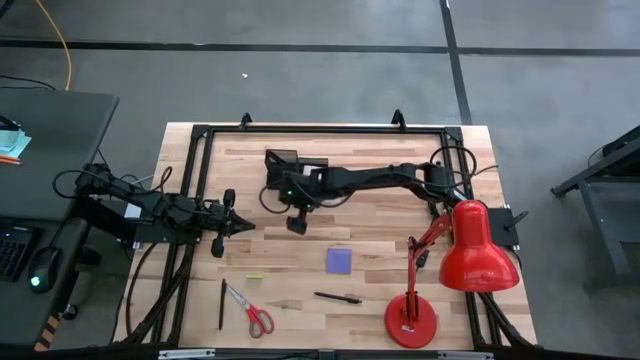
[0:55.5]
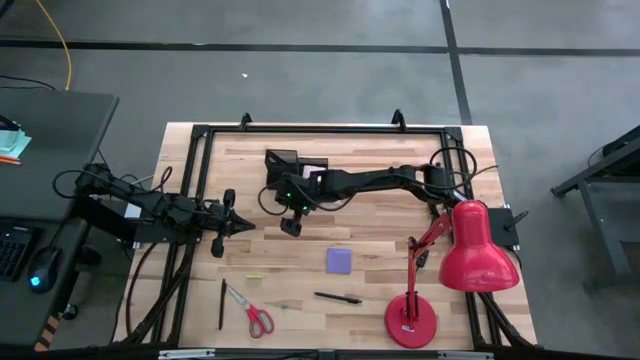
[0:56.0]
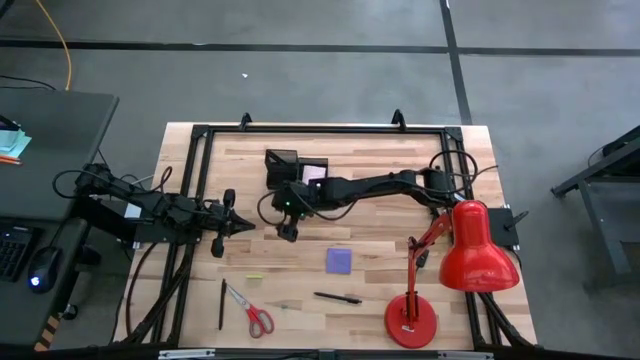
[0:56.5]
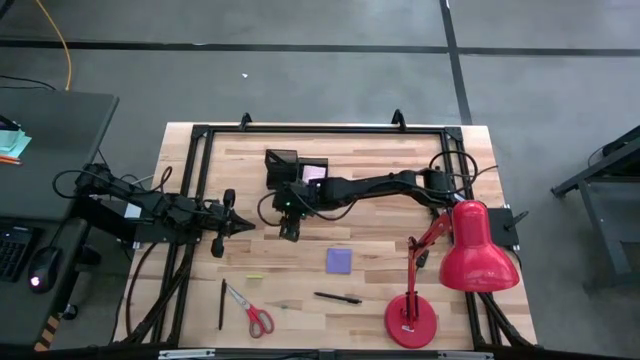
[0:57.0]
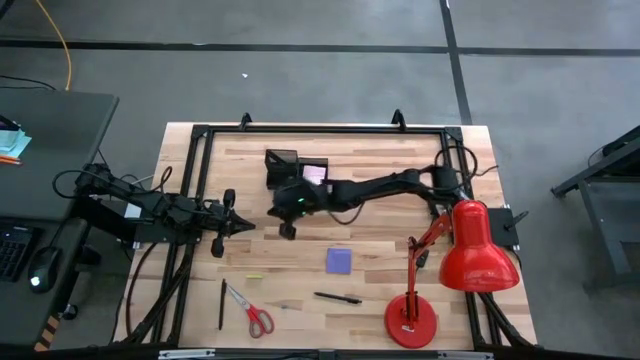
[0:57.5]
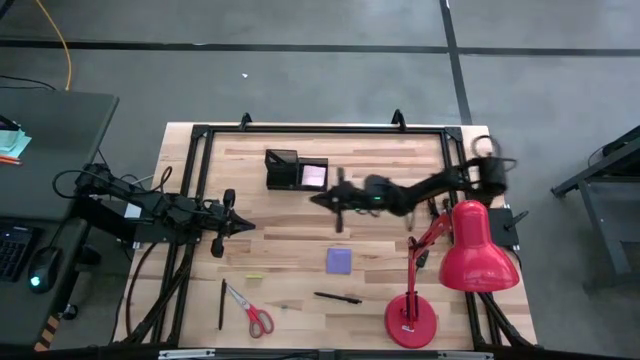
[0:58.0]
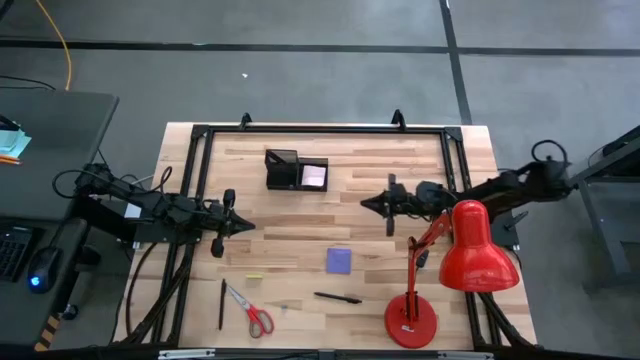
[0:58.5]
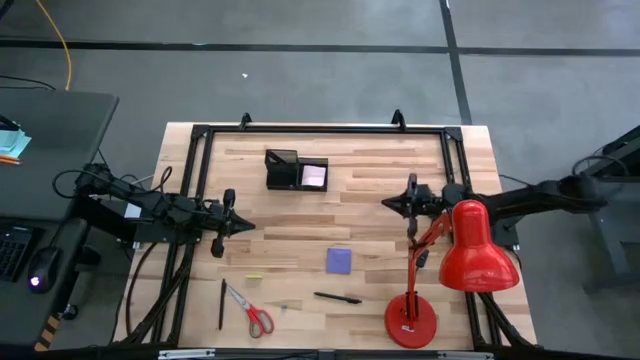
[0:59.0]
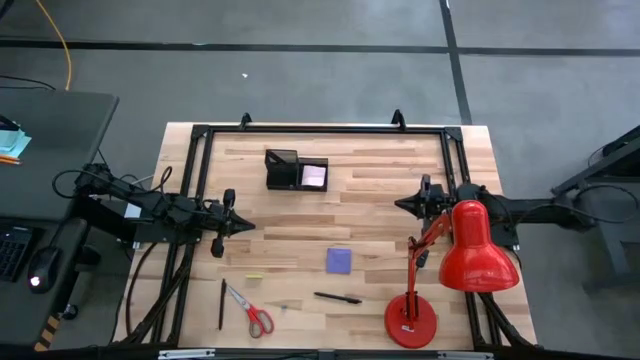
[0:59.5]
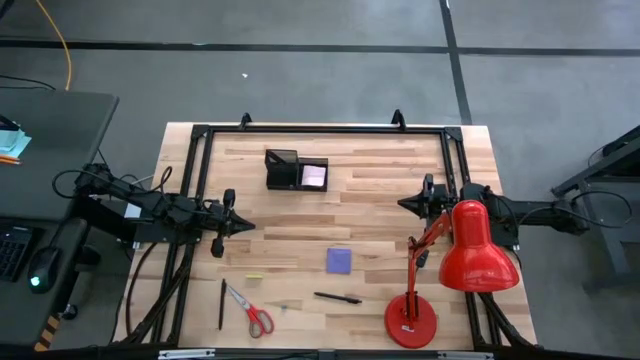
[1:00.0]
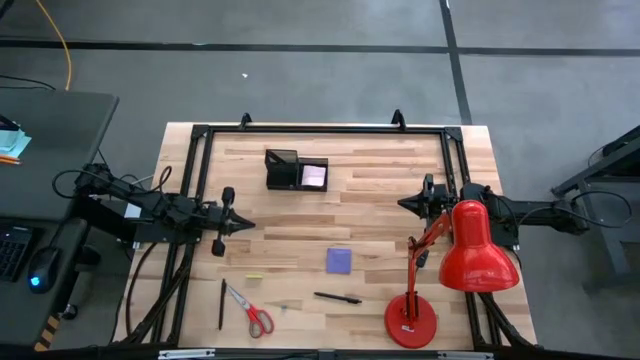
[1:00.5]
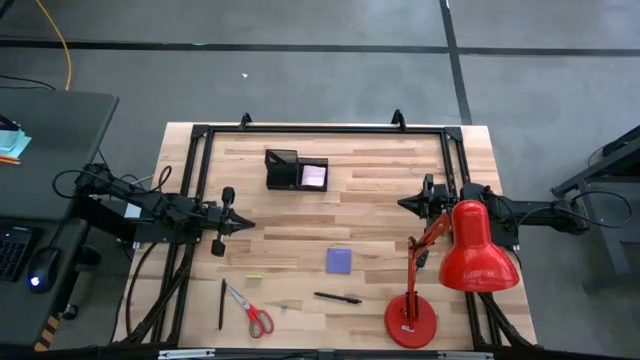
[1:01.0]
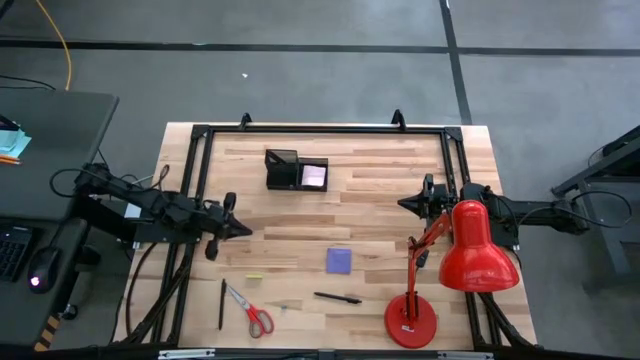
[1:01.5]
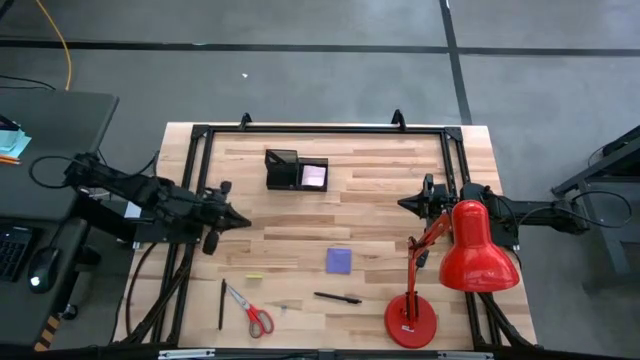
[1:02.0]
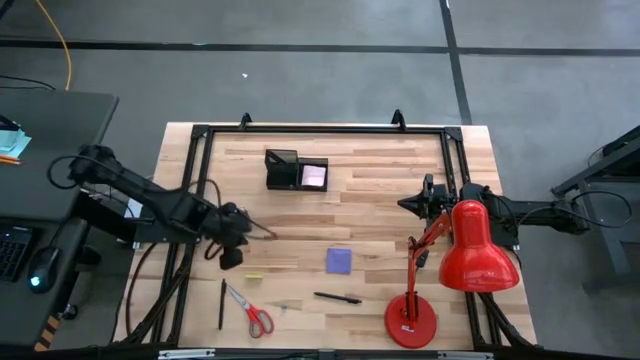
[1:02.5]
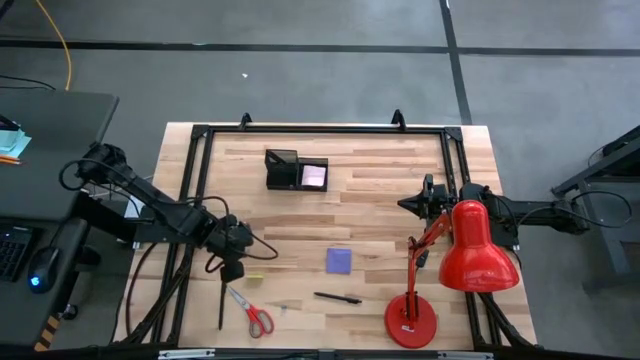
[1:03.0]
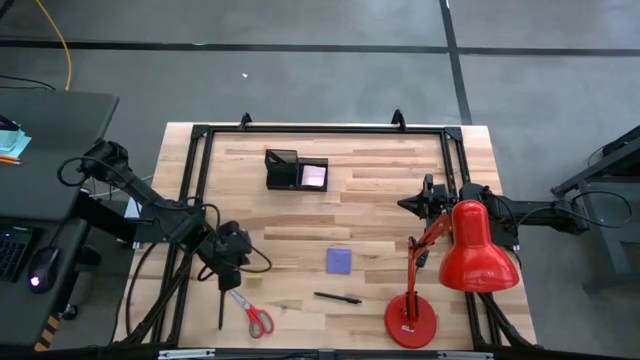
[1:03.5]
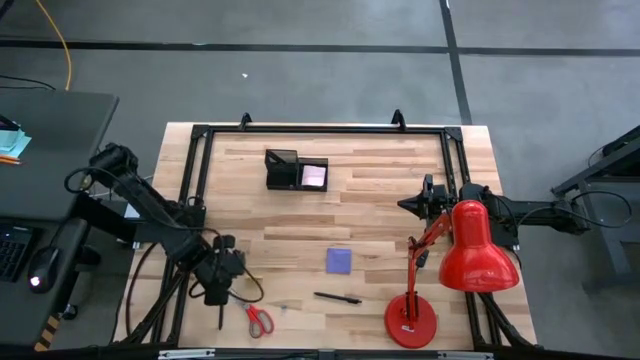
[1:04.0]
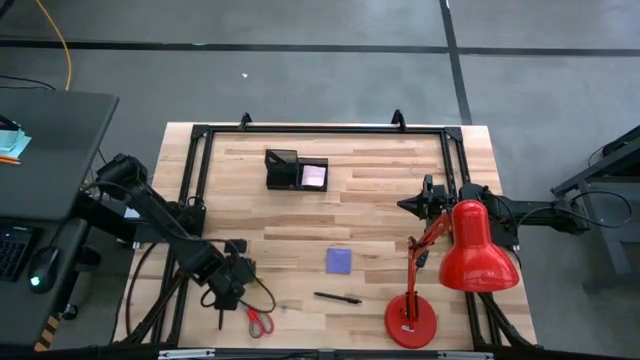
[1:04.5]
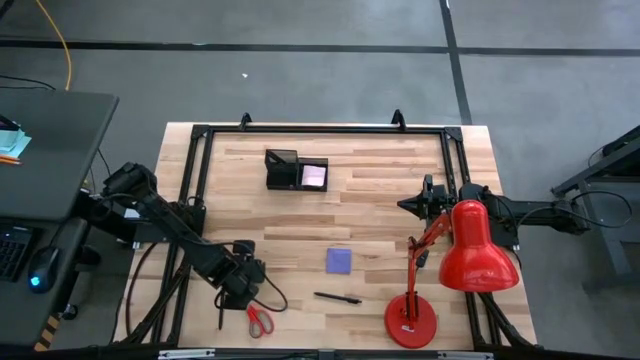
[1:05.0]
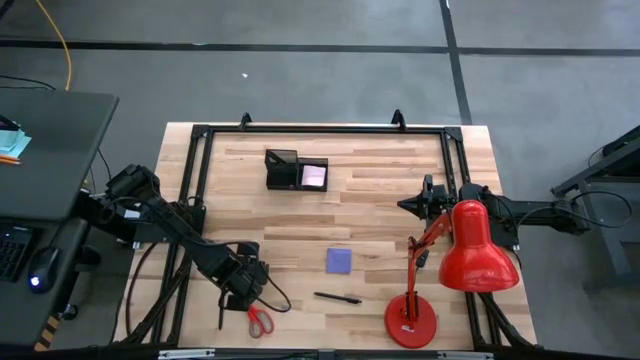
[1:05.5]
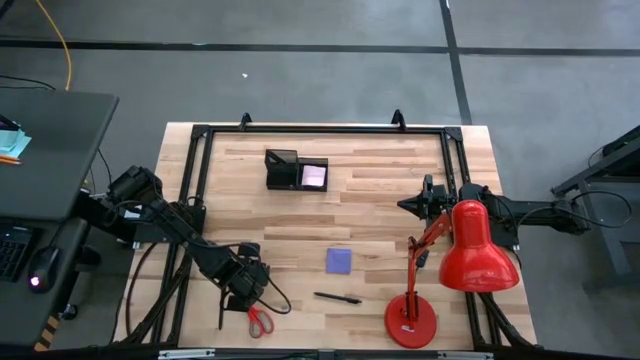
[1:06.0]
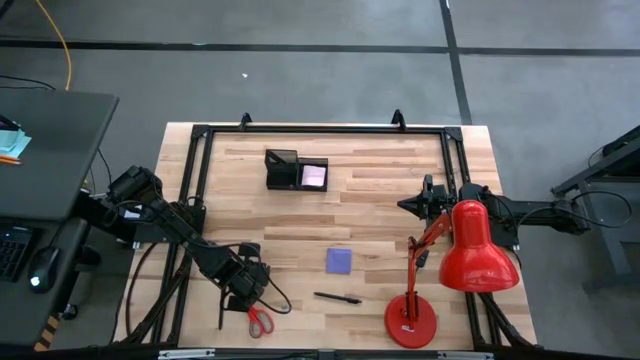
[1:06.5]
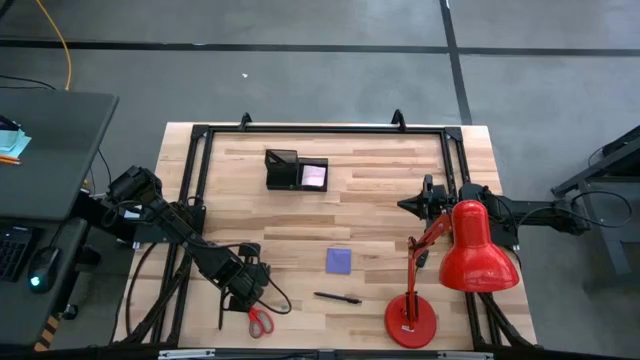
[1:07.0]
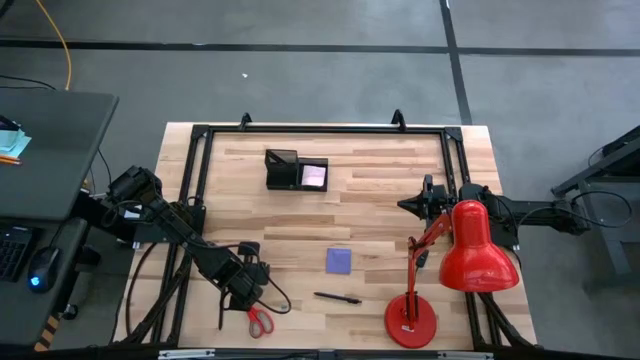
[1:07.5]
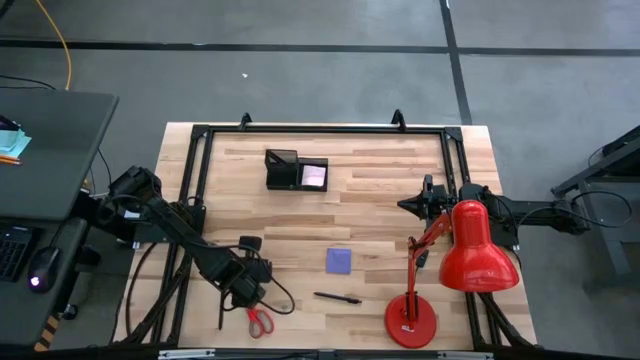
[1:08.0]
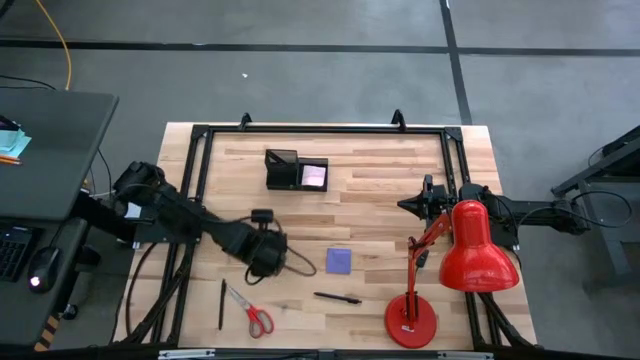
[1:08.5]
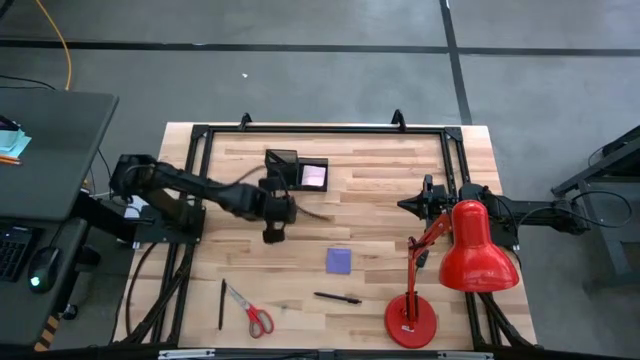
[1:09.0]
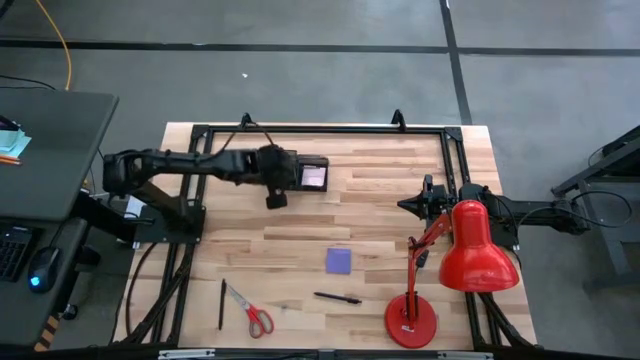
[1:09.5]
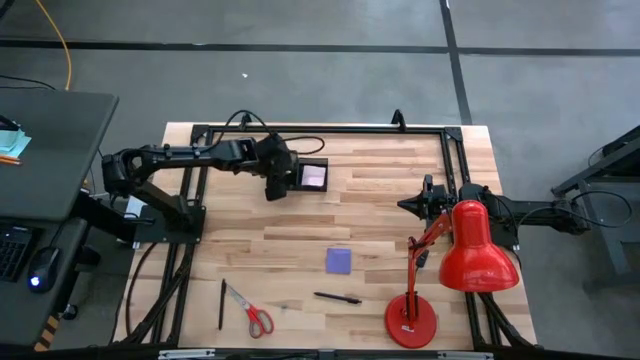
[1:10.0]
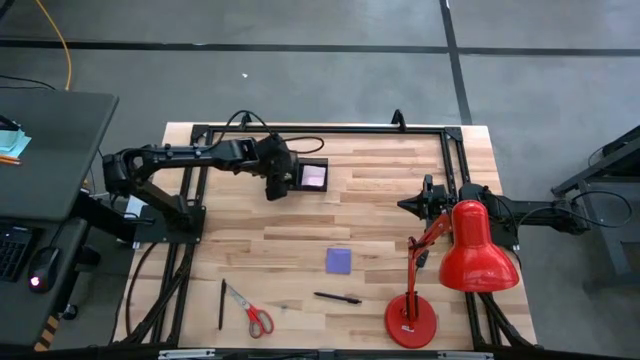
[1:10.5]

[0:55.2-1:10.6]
Task: Pick and place office supplies into organizer
Put the yellow eraser into the black desk organizer

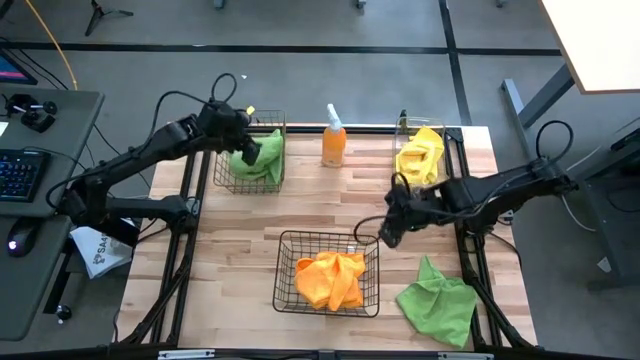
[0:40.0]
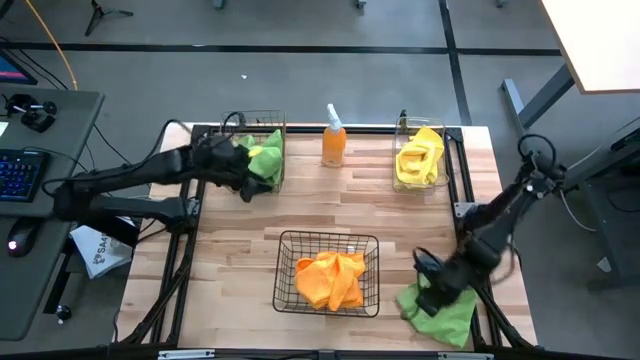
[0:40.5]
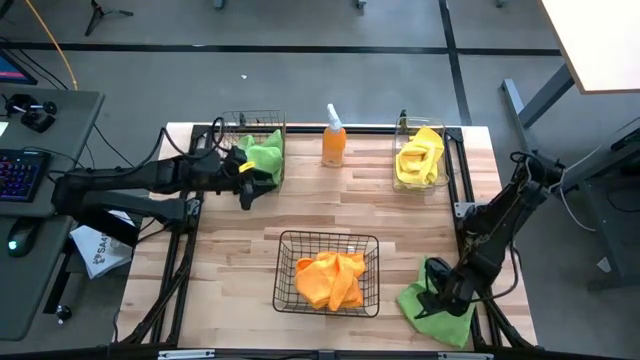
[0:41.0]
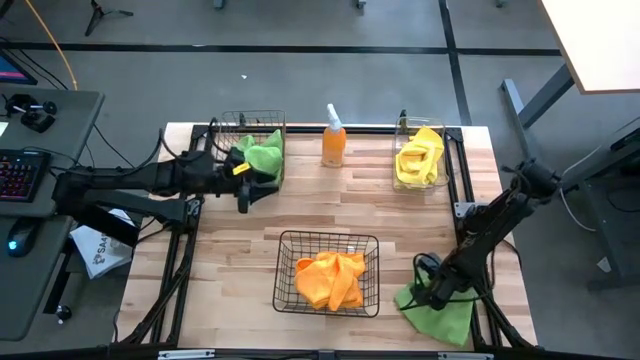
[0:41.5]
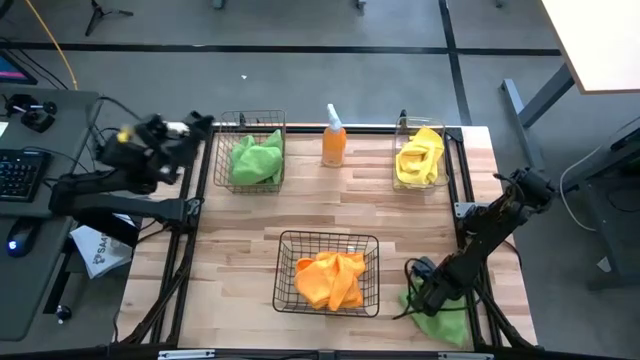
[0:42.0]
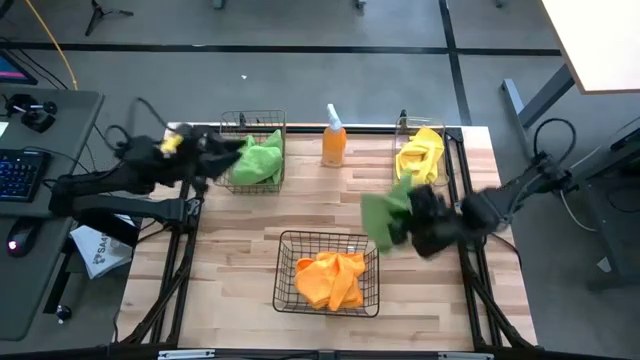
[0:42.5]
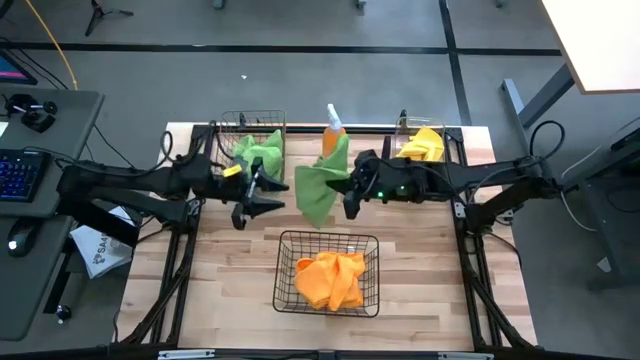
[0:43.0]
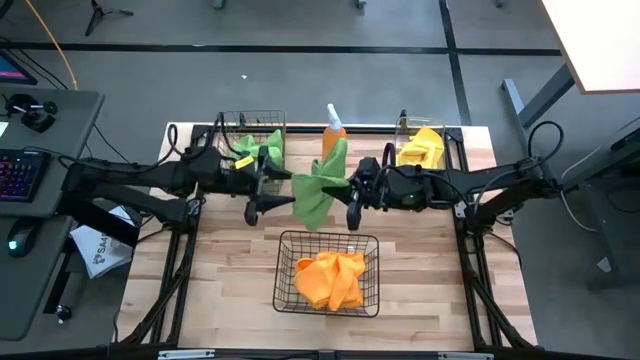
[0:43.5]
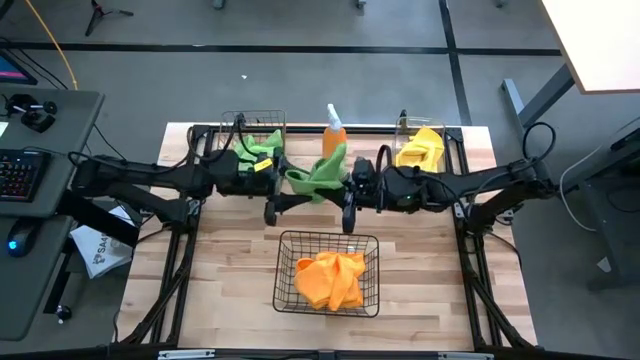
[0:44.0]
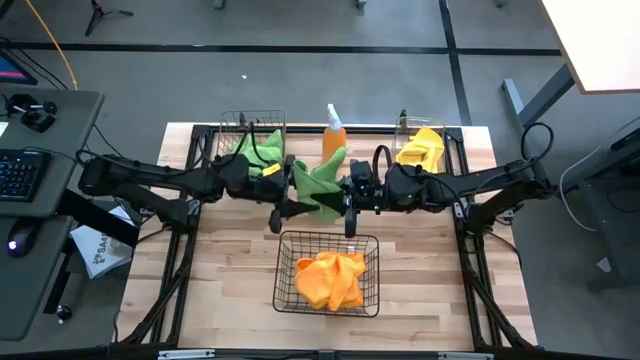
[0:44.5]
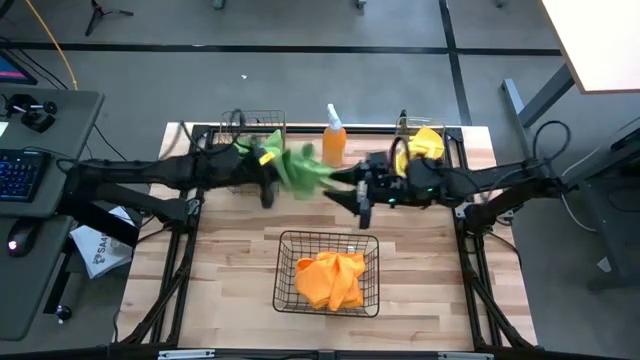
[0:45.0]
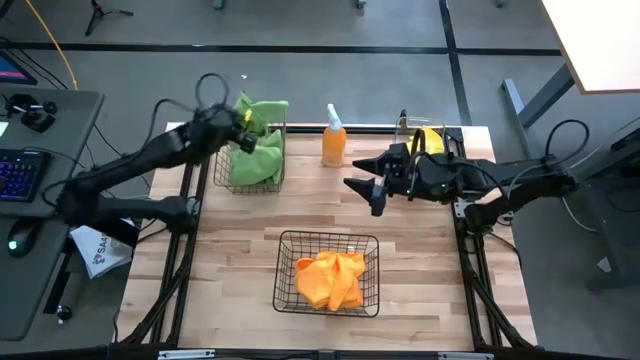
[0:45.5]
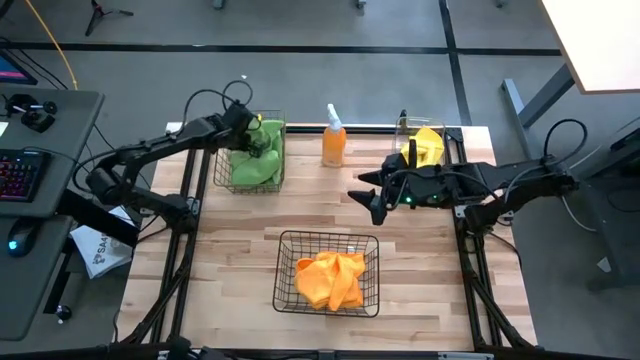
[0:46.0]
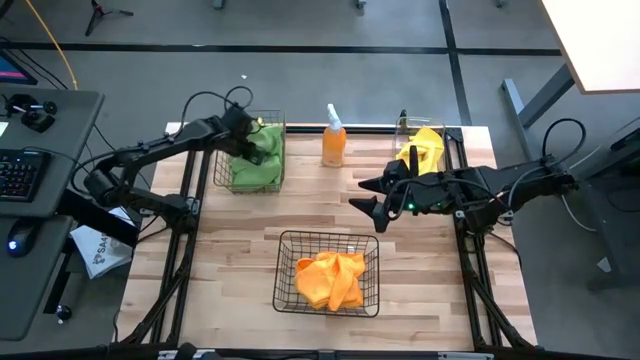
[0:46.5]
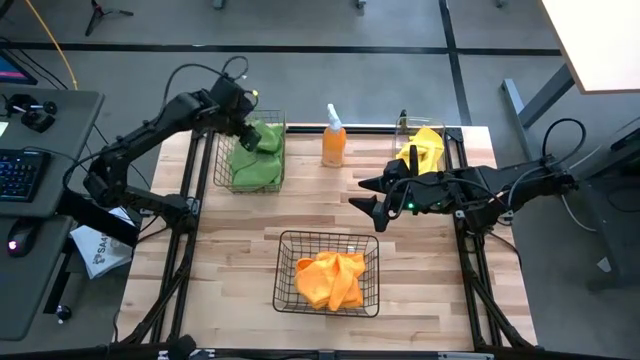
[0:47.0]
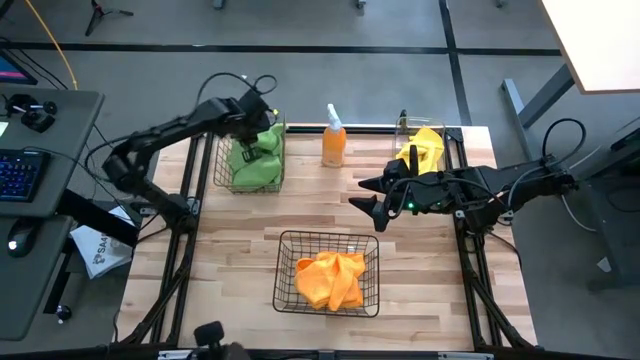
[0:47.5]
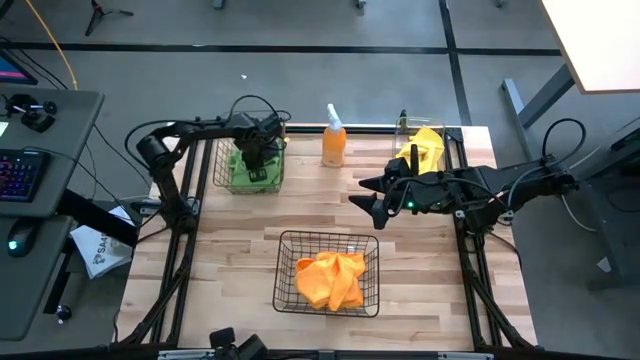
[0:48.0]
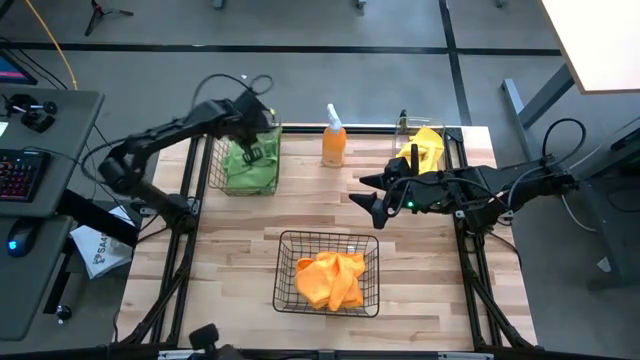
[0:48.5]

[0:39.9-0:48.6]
Task: Sort microfiber towel by color & place in baskets
Put the green microfiber towel into the gold wire basket
